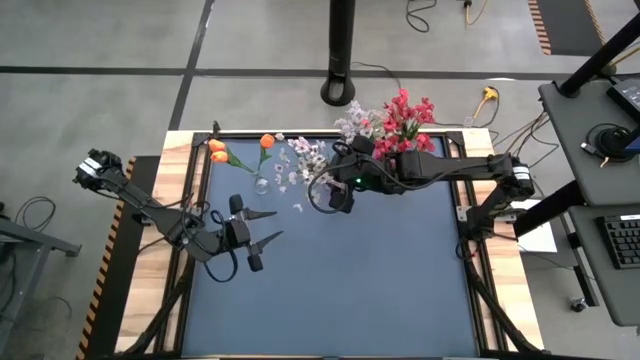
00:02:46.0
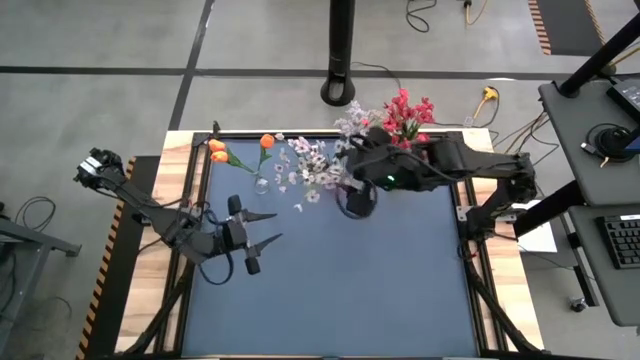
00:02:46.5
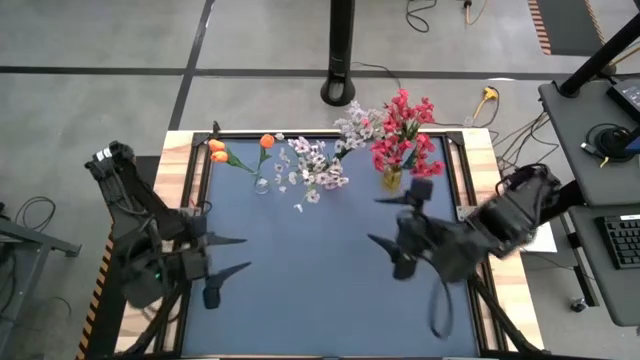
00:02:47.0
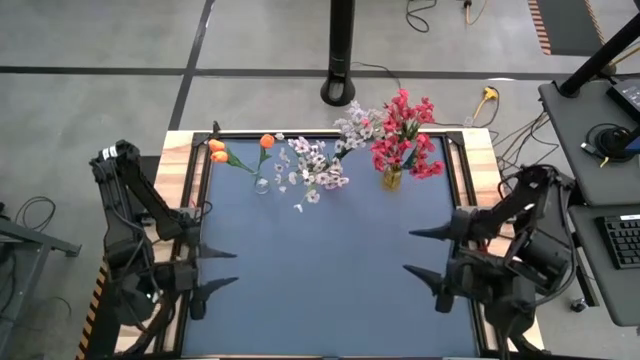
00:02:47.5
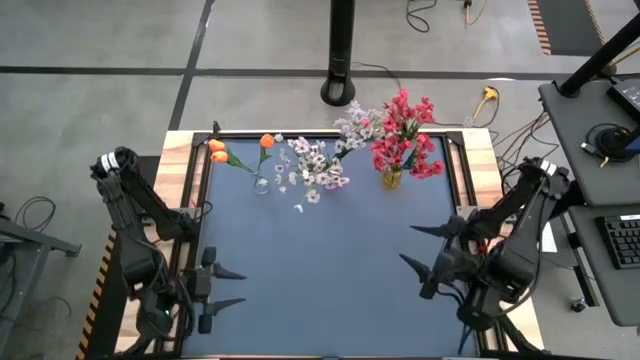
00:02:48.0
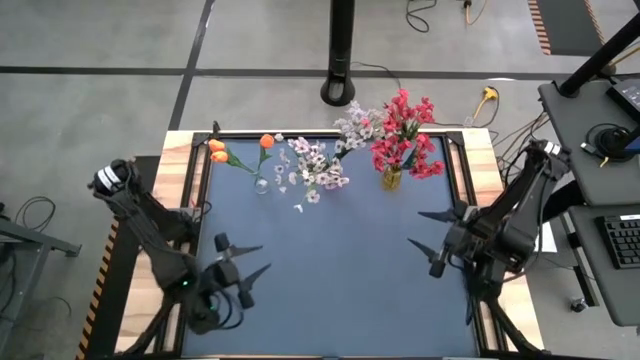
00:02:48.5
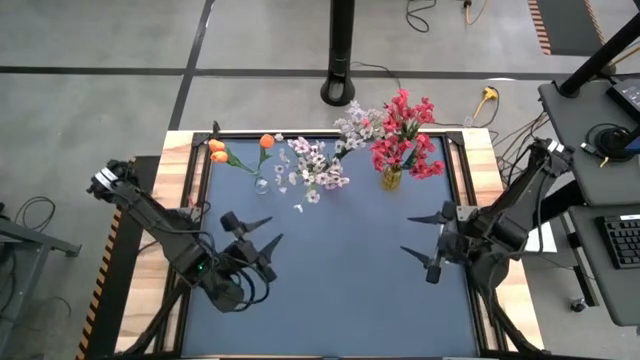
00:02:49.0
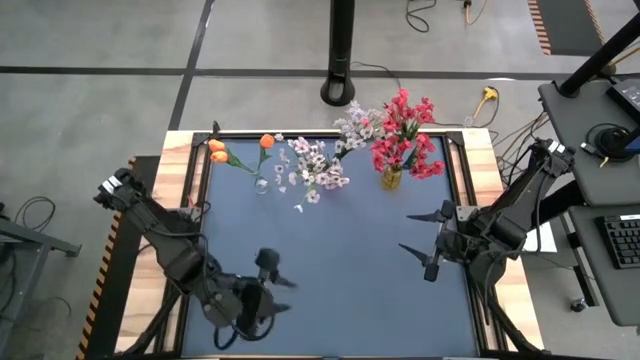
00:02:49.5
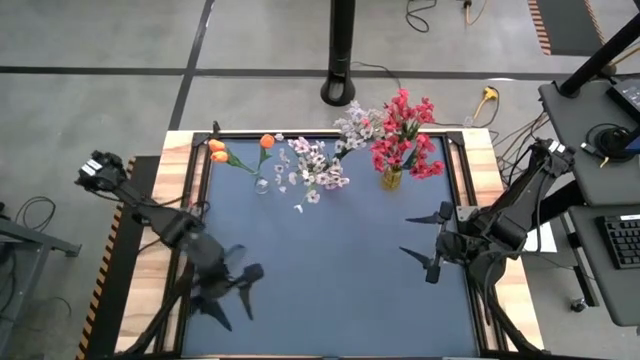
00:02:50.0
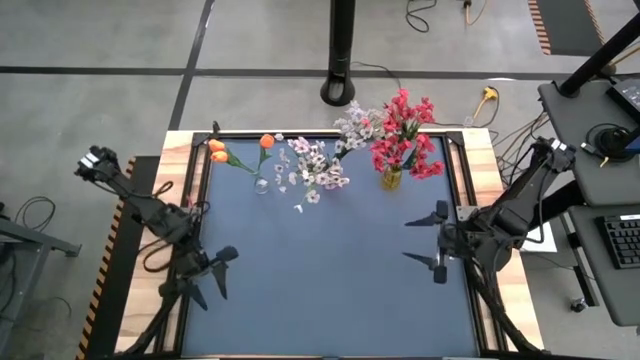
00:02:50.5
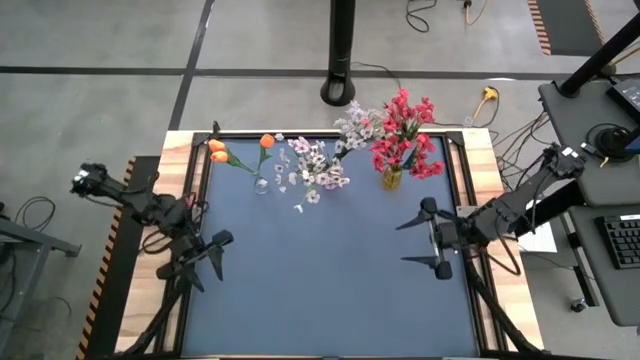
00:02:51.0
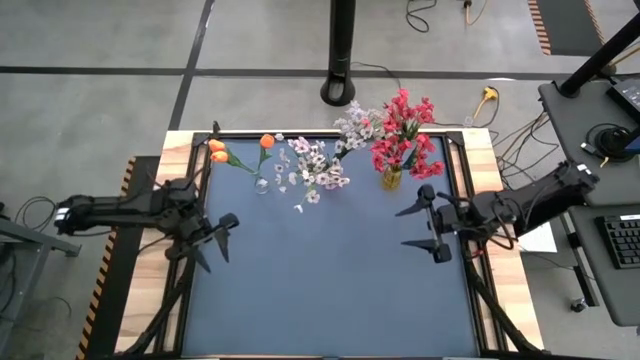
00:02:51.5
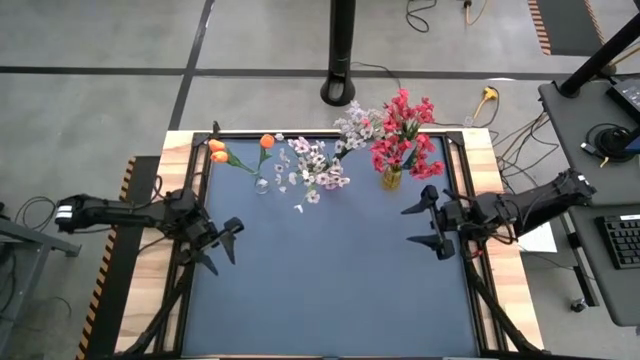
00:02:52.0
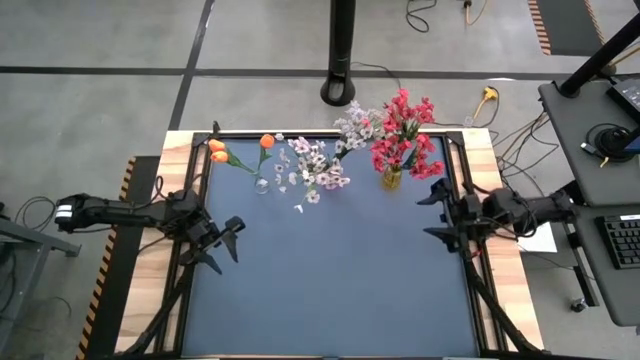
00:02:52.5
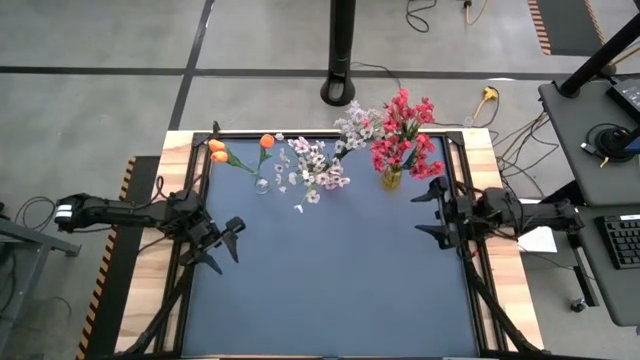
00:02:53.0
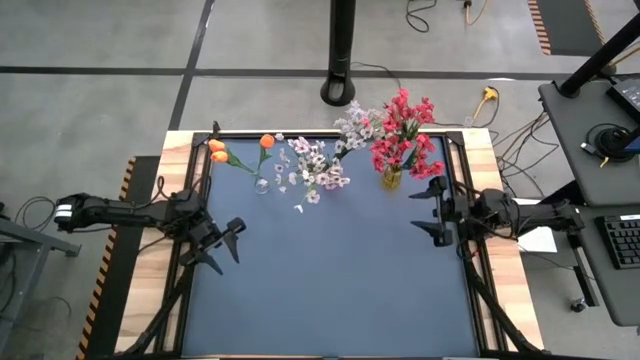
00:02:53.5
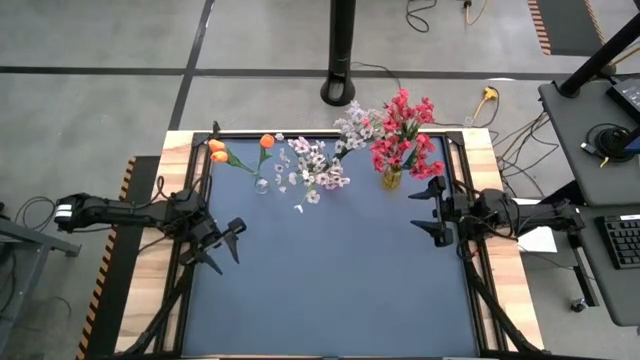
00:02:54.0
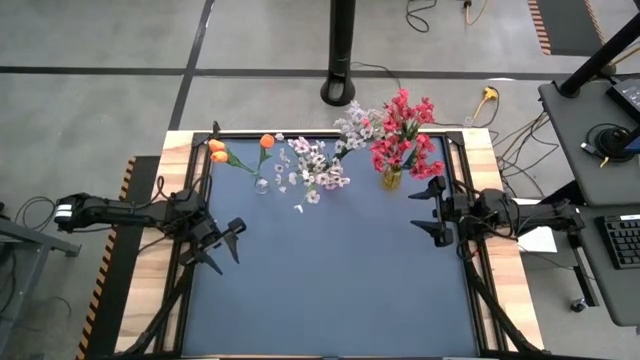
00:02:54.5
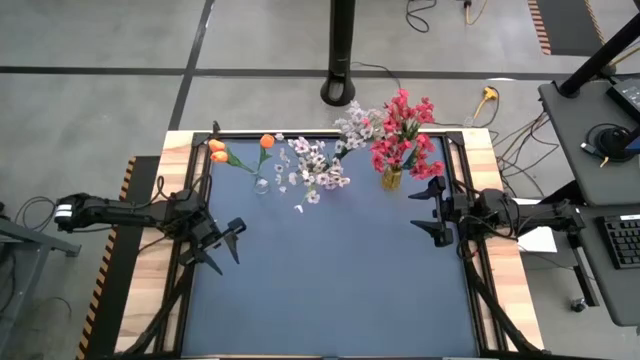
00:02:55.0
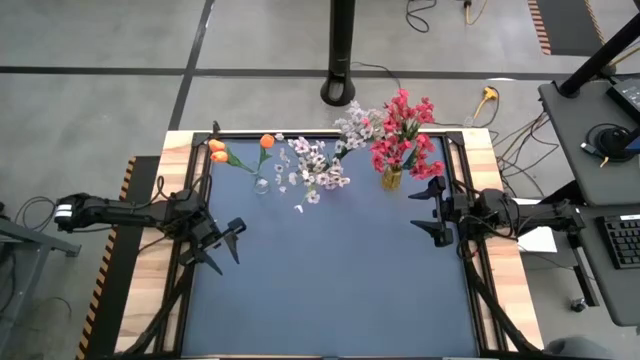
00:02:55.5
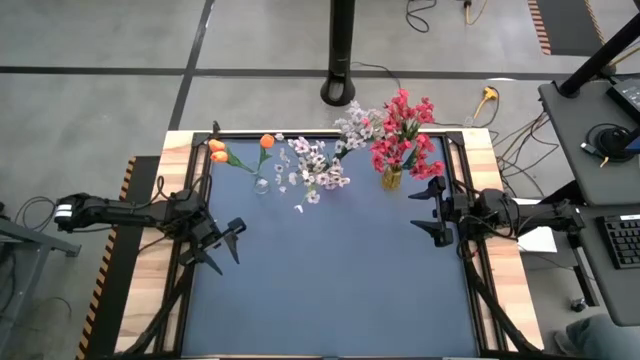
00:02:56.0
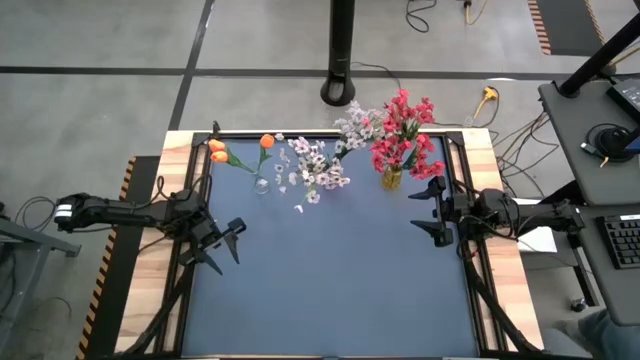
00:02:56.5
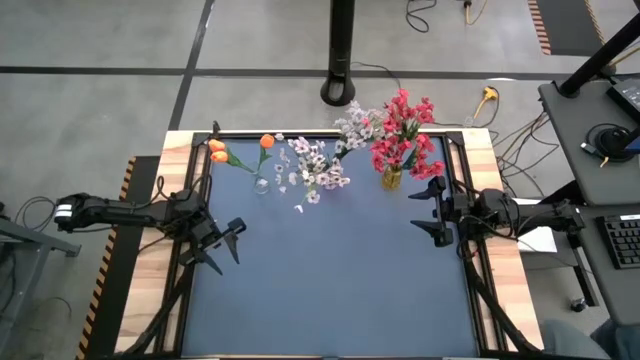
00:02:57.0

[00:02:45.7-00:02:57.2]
Task: Sort flowers into vase by color
Return to Home Position

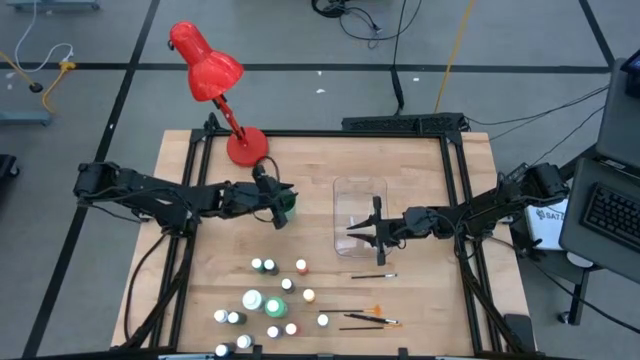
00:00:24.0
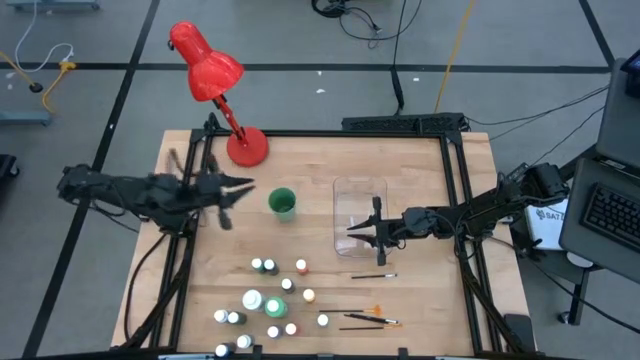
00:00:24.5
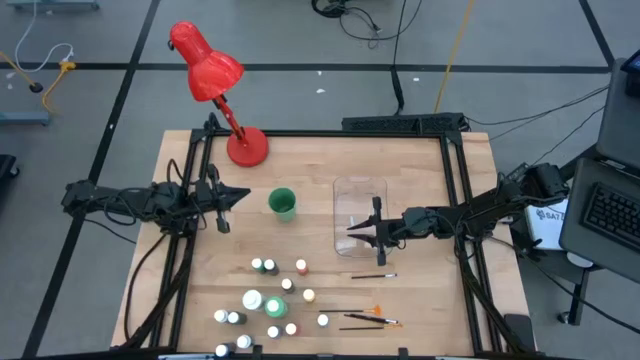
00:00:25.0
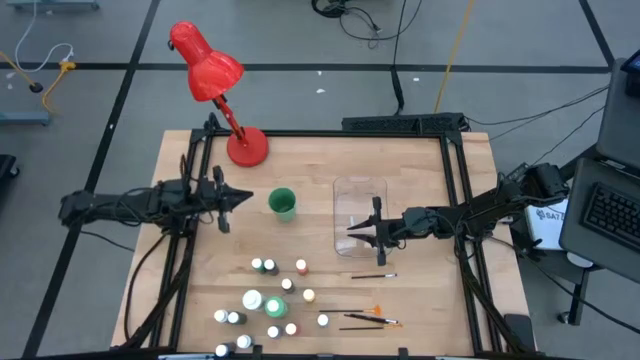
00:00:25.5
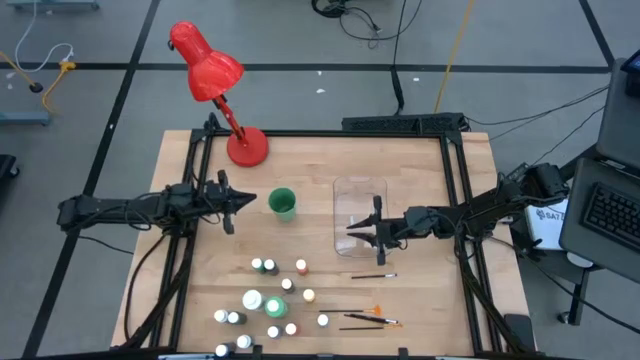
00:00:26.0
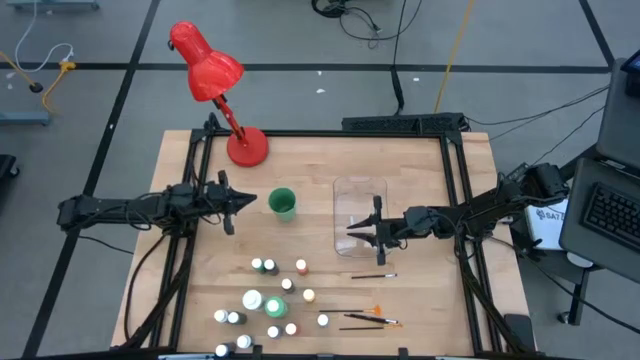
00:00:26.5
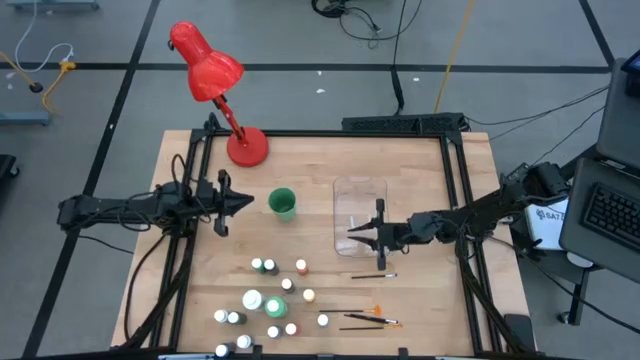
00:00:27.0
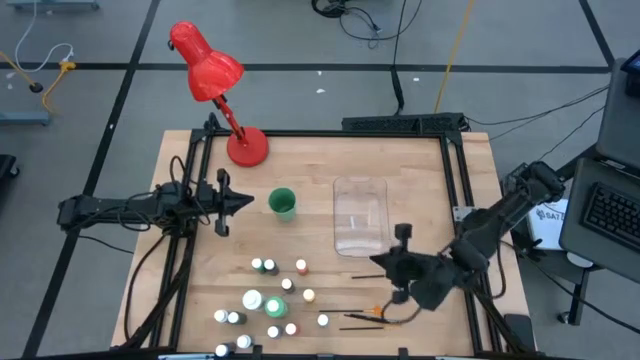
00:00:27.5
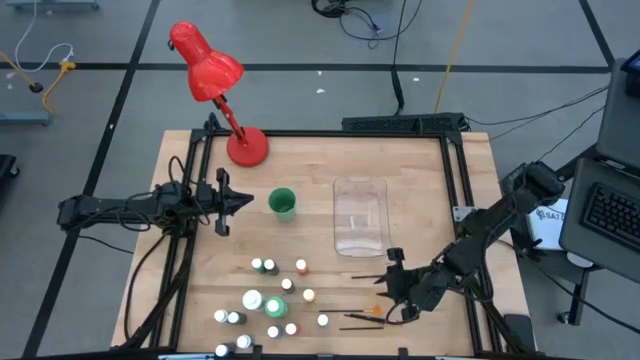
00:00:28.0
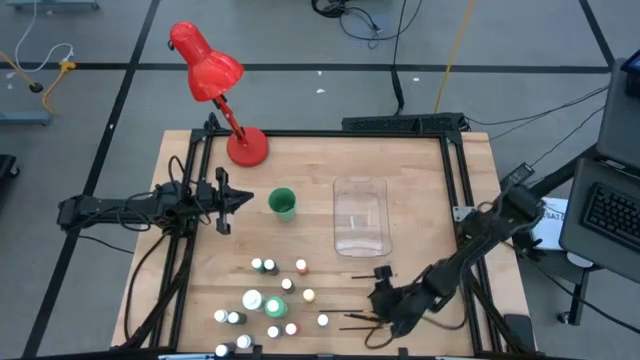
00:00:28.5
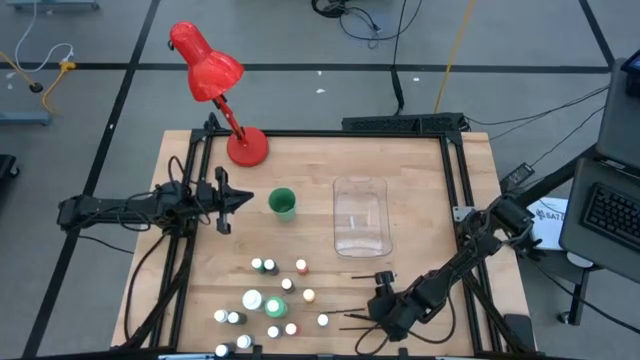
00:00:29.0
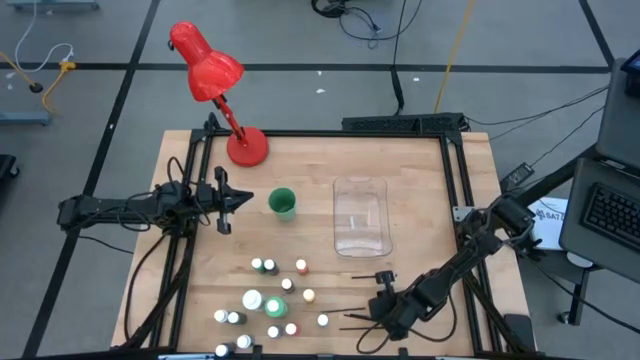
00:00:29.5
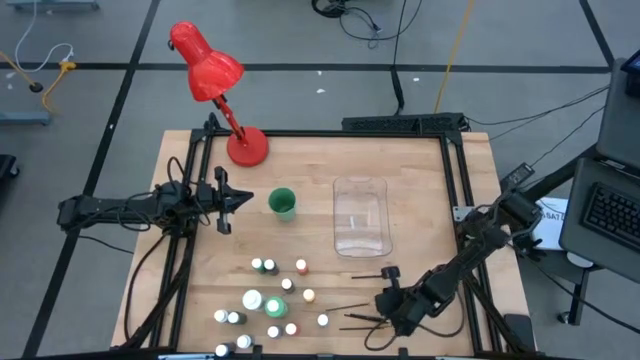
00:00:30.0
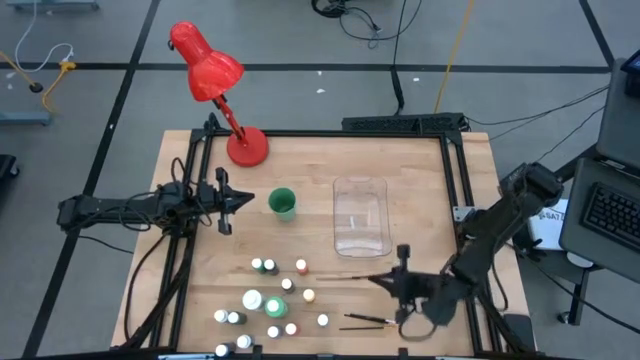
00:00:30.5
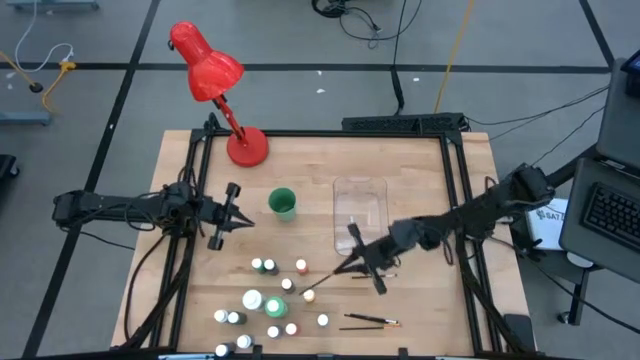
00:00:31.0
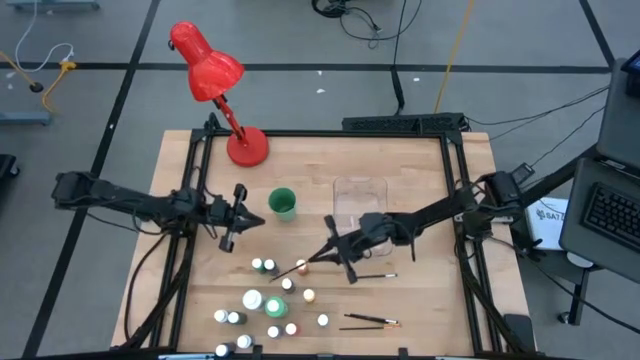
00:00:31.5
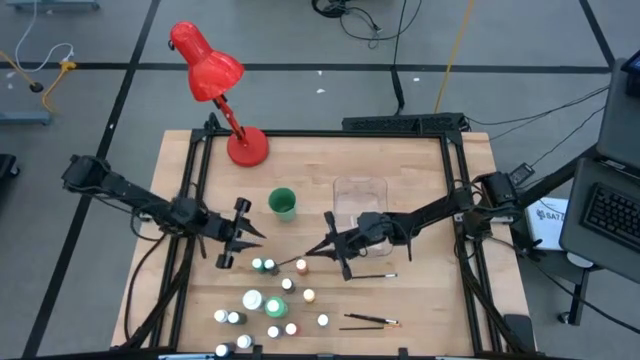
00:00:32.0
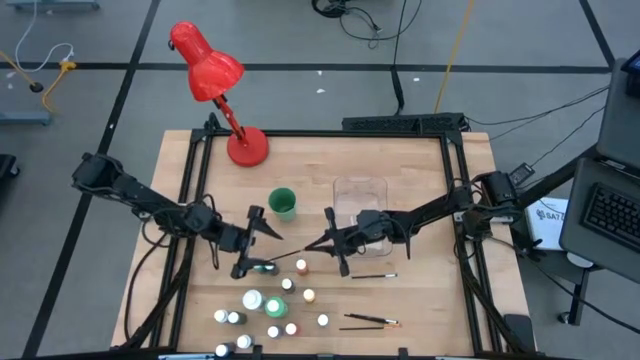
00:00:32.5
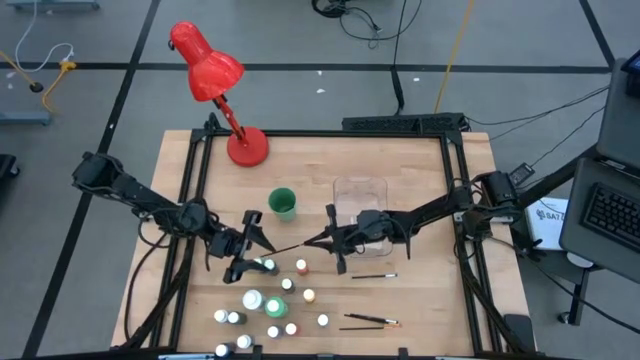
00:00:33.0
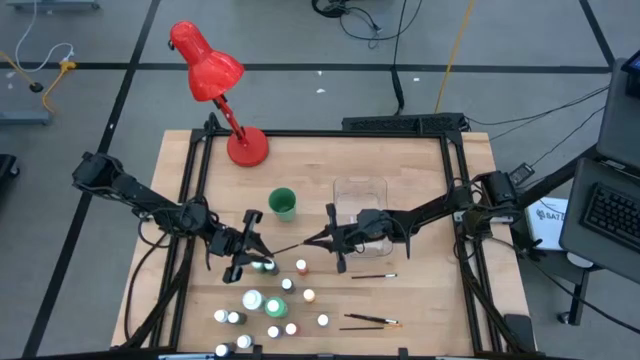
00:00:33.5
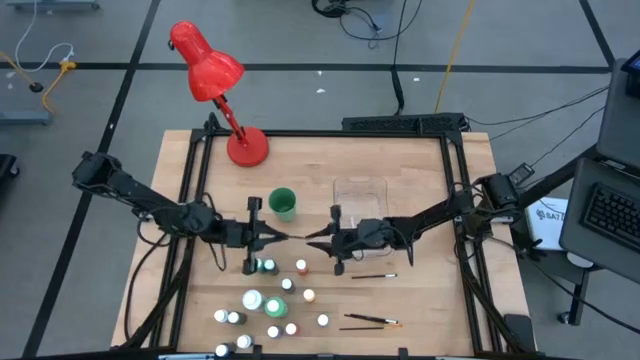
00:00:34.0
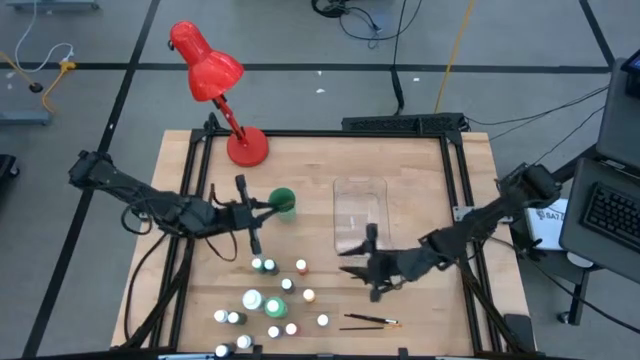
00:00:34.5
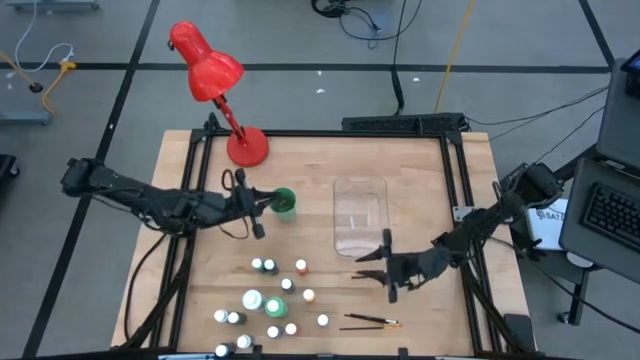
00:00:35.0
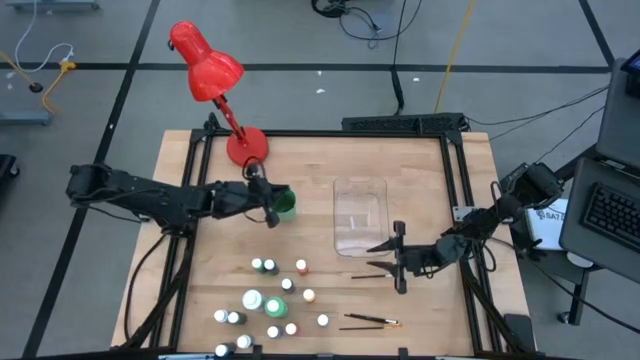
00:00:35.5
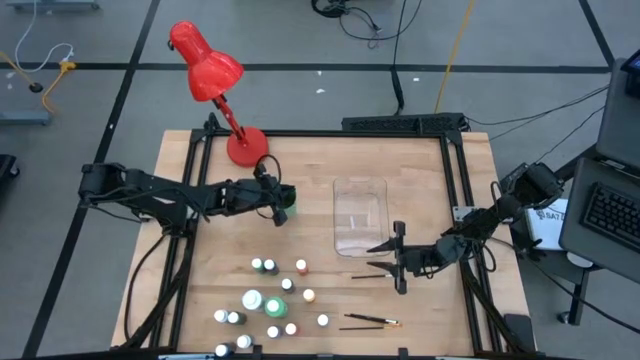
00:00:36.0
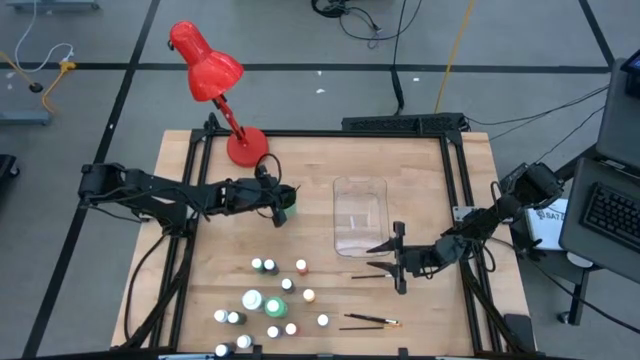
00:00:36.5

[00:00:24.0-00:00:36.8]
Task: Pick & Place Paint Supplies
Put the gold paintbrush into the green cup
